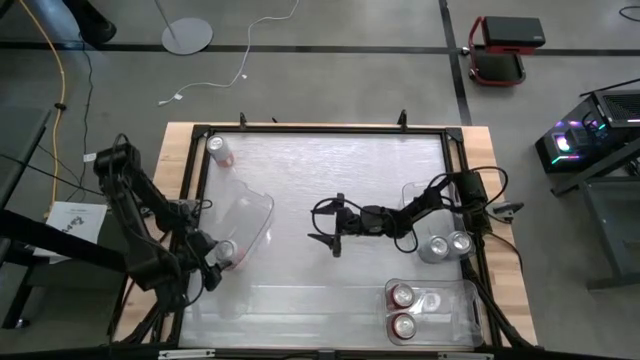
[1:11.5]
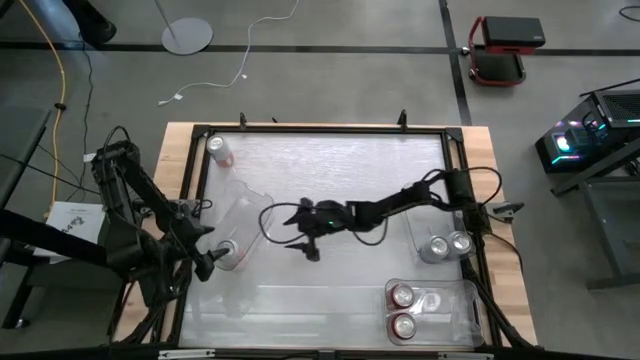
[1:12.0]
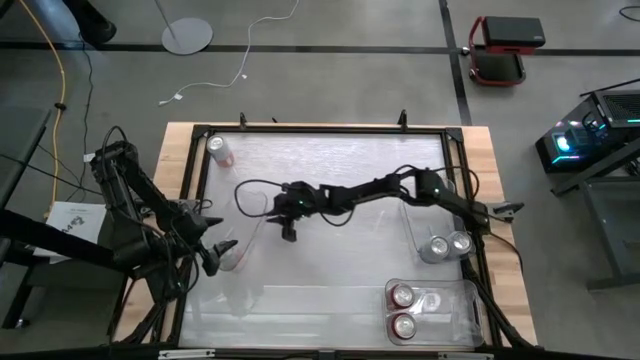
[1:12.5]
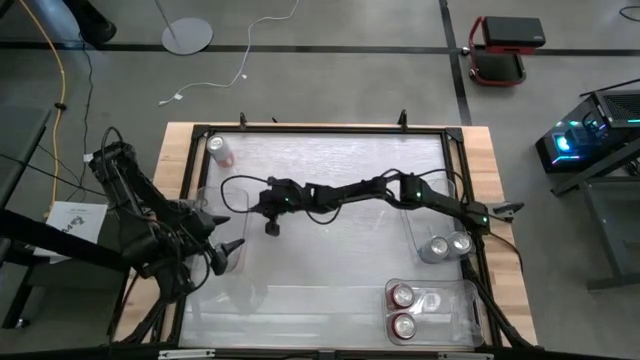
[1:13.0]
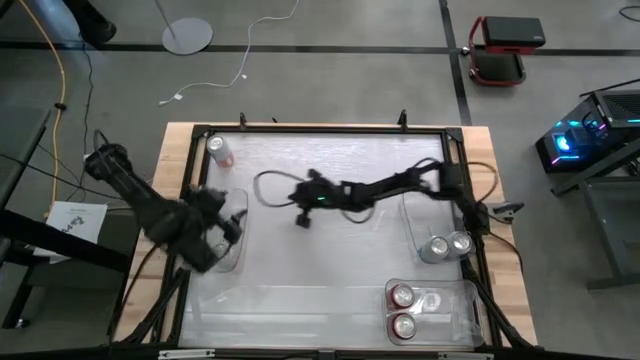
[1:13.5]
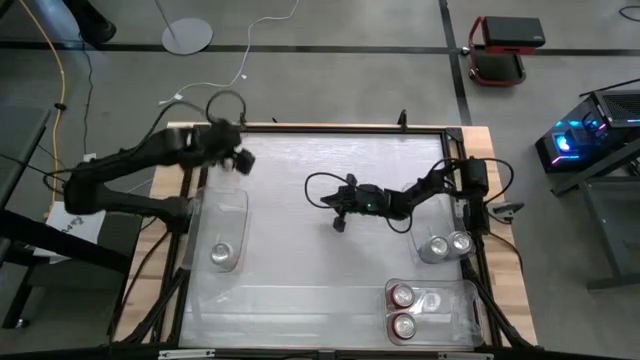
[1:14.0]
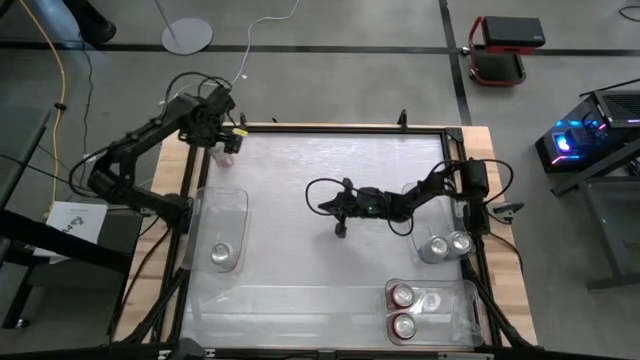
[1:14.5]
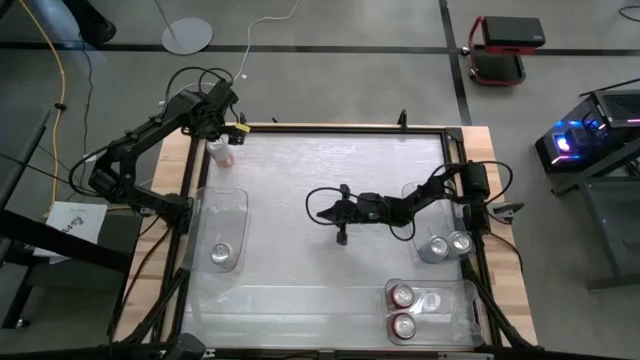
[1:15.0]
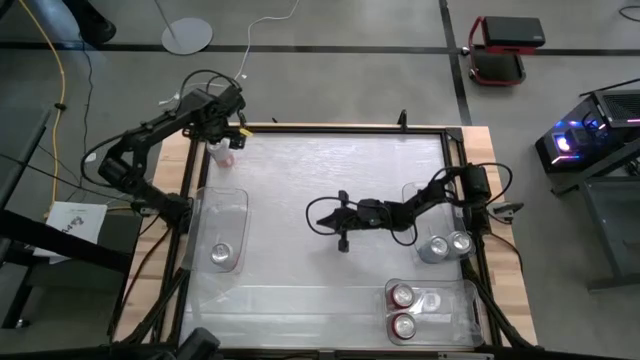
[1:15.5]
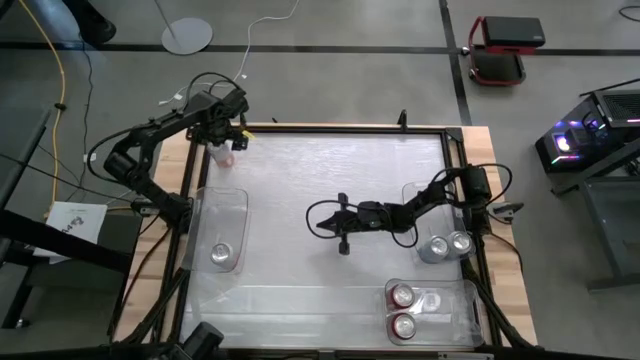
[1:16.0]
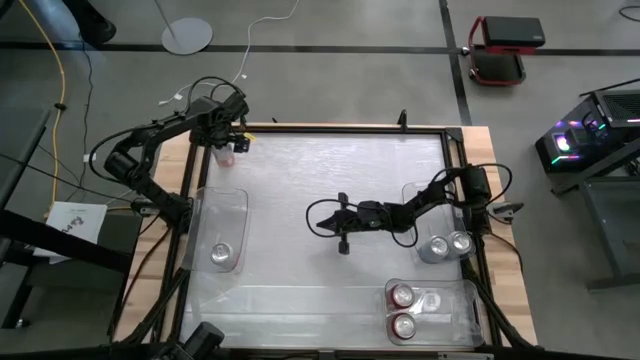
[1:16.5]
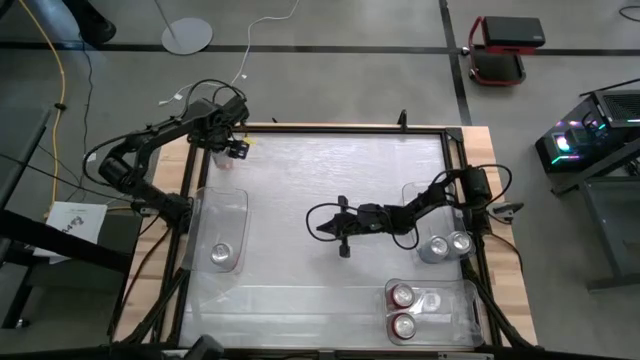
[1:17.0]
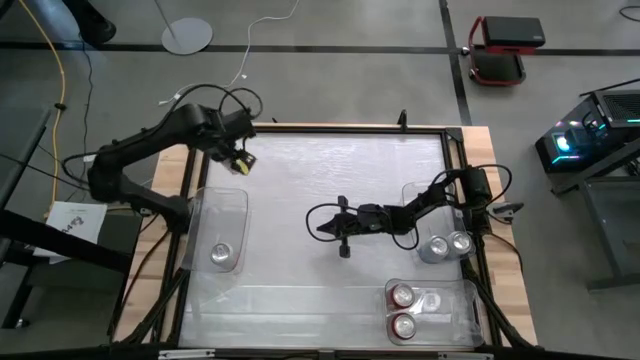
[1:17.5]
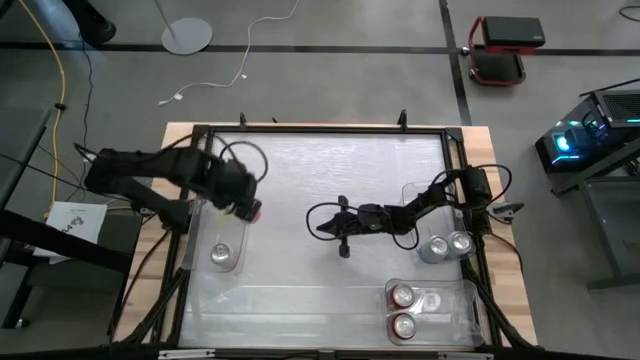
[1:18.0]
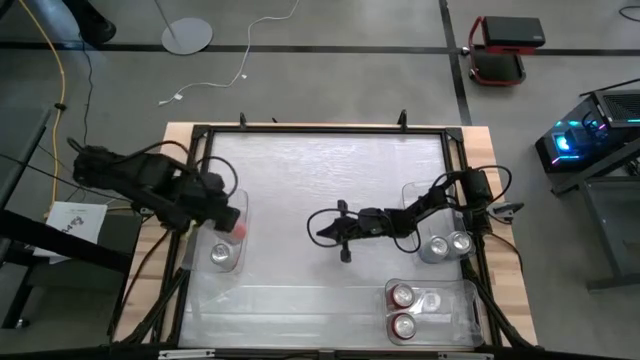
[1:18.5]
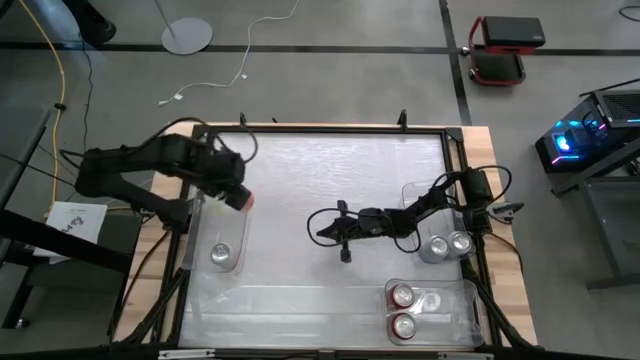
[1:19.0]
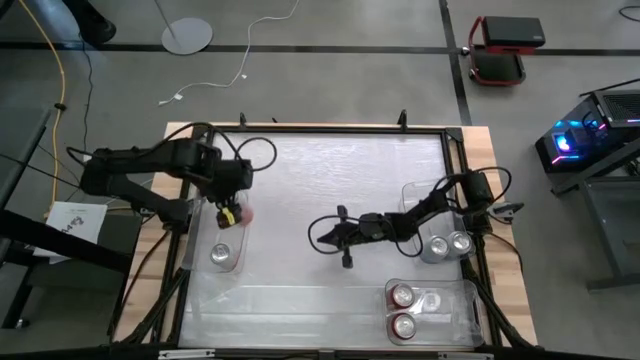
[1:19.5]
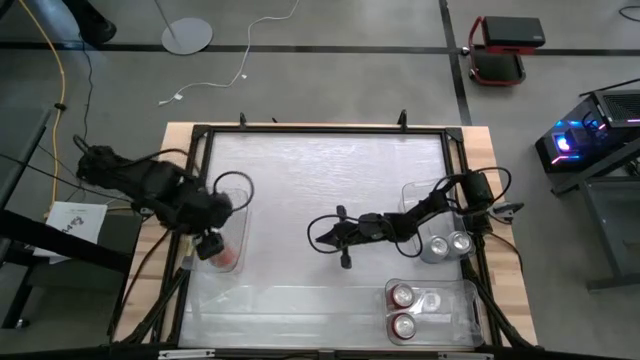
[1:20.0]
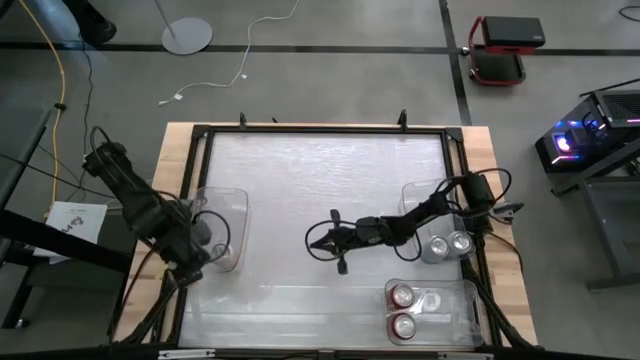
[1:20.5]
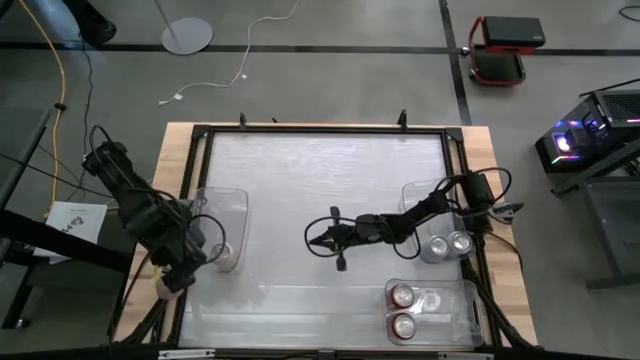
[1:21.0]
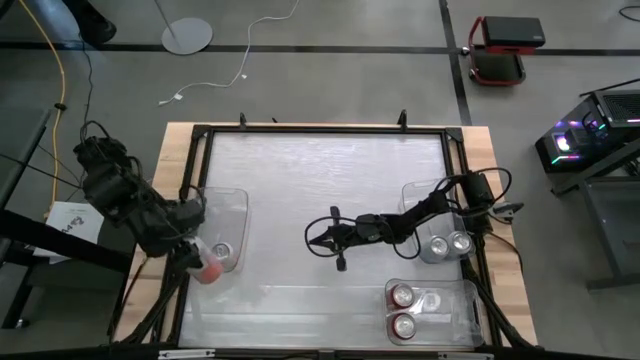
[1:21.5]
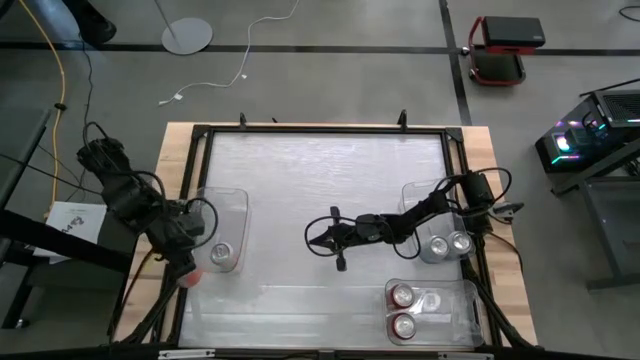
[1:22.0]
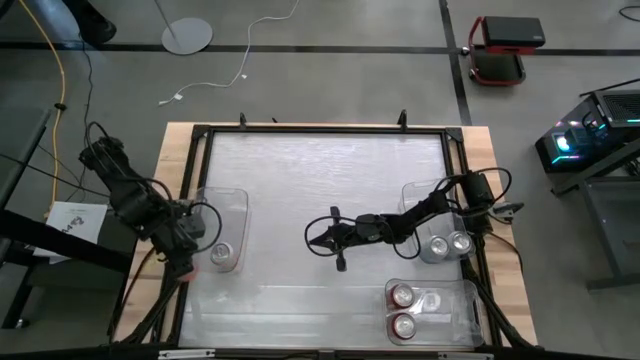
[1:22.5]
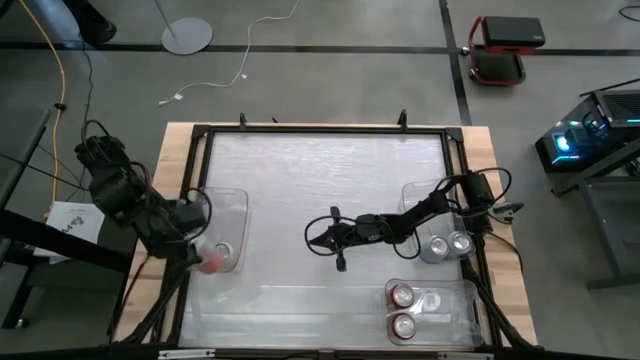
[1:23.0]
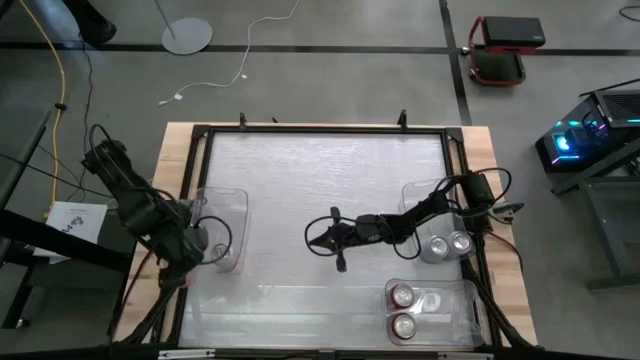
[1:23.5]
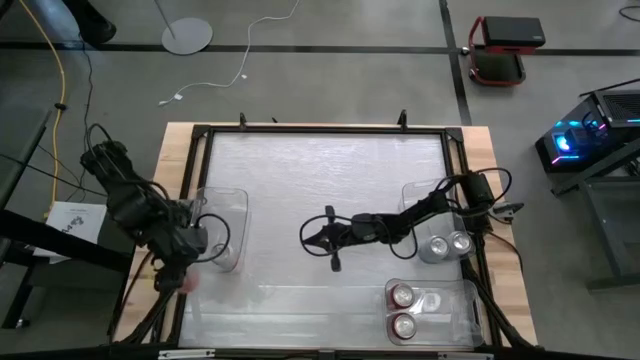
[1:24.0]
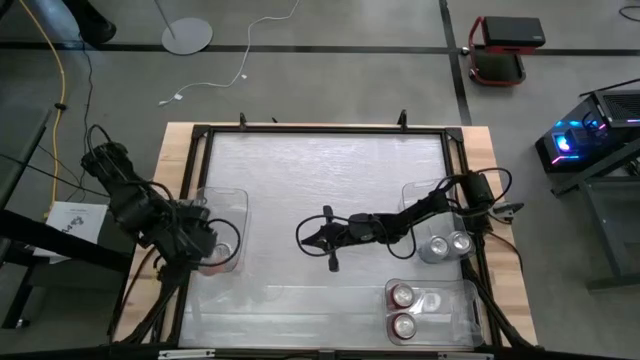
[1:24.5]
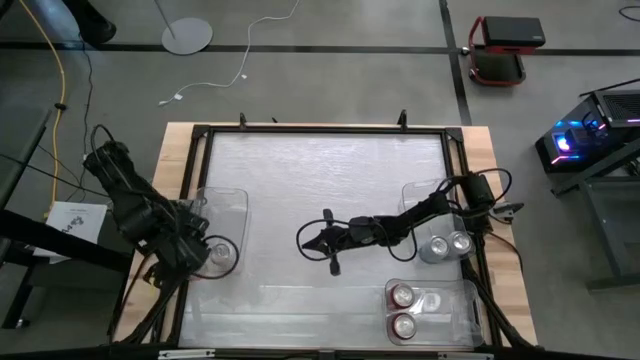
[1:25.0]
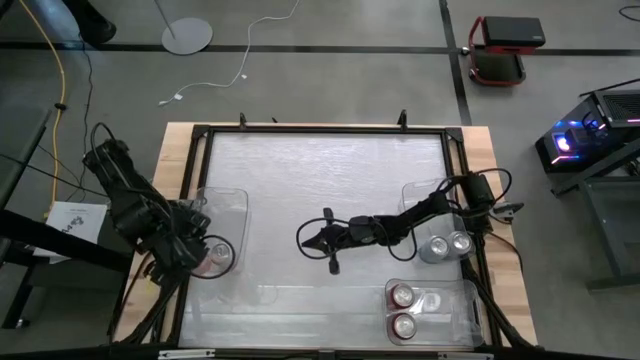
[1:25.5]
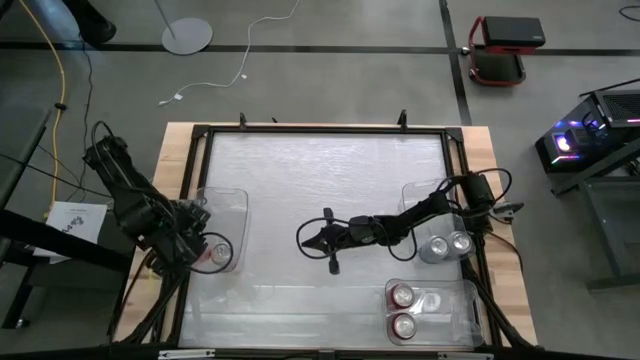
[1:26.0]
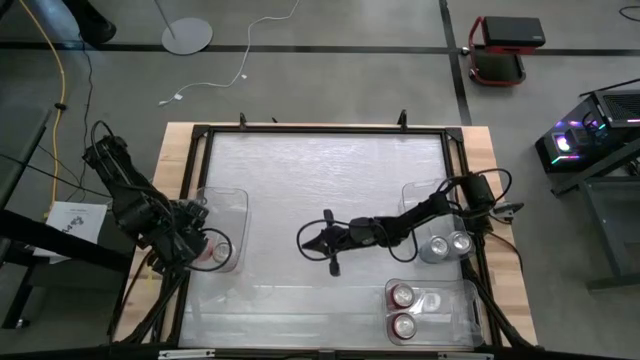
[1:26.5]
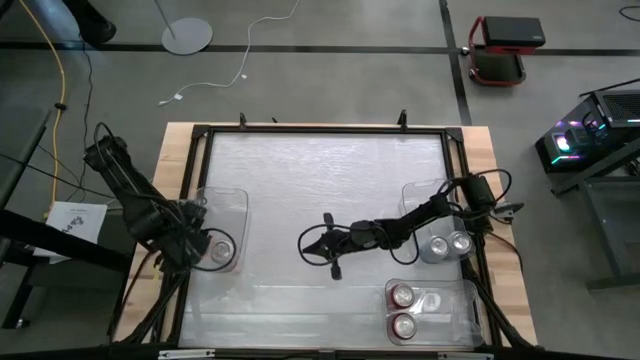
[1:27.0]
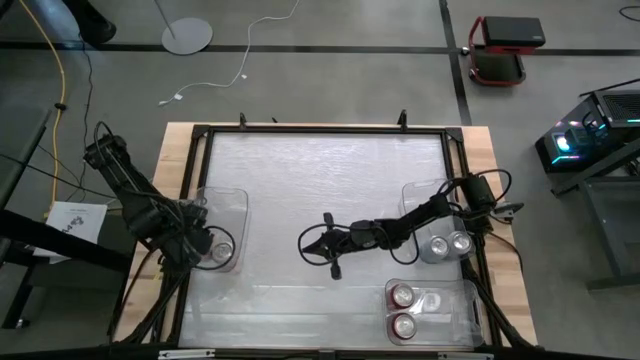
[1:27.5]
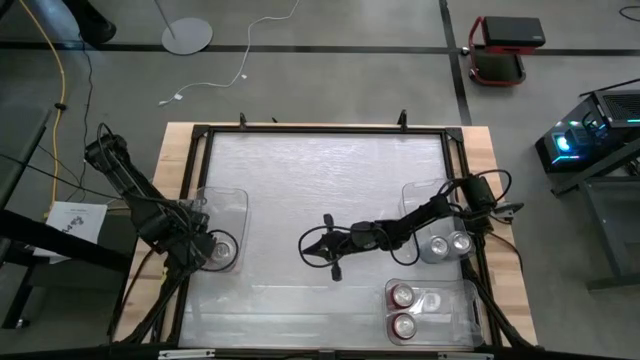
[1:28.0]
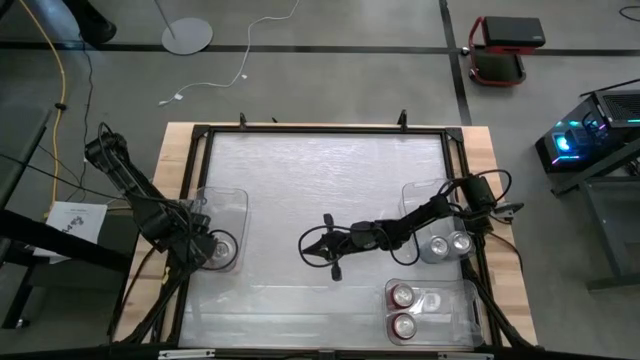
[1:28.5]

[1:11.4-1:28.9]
Task: Sort soda cans
Put the orange-white soda can into the left transparent bin

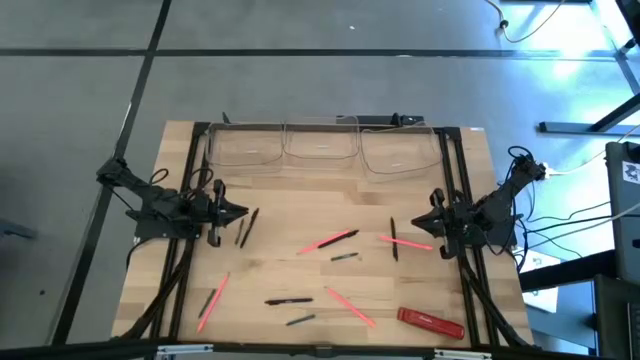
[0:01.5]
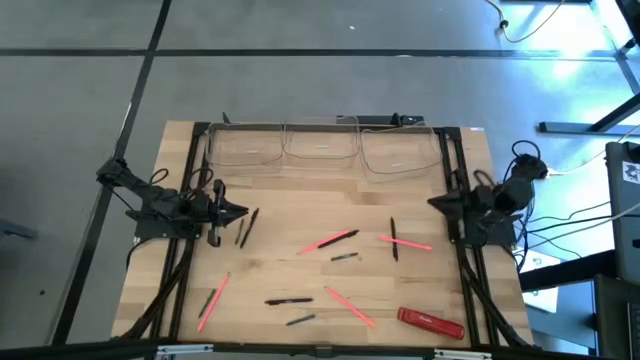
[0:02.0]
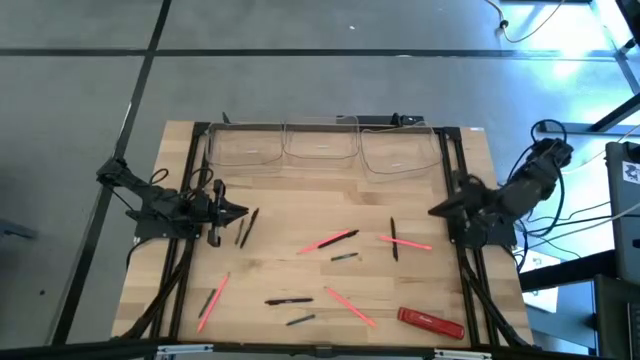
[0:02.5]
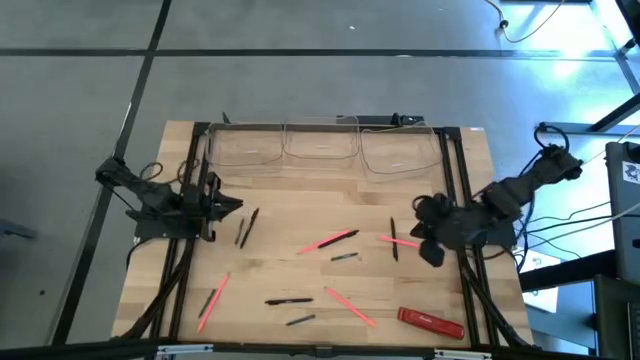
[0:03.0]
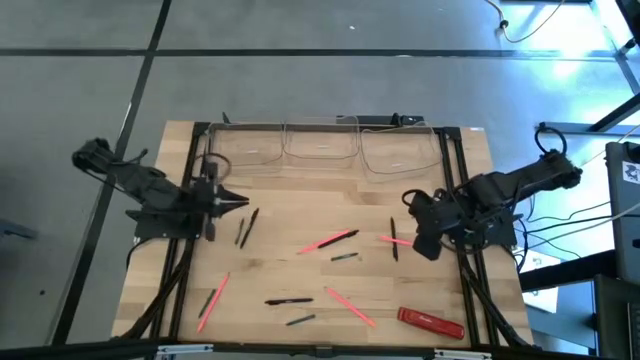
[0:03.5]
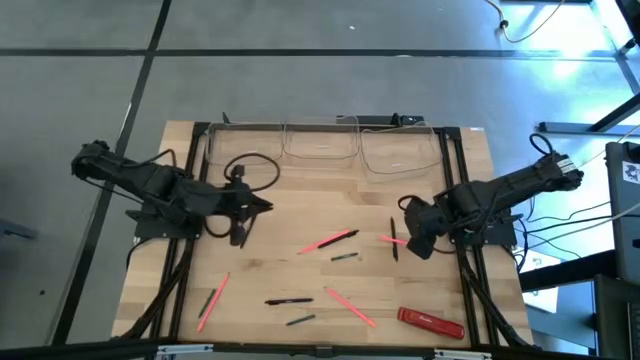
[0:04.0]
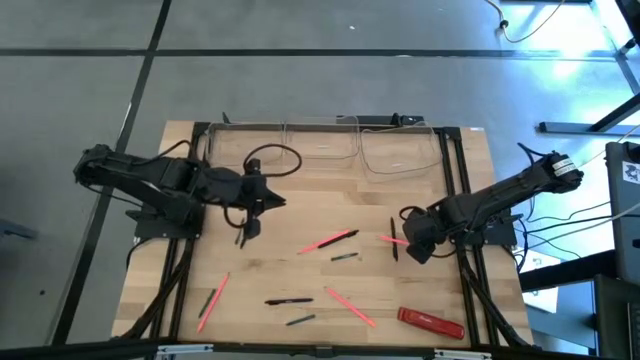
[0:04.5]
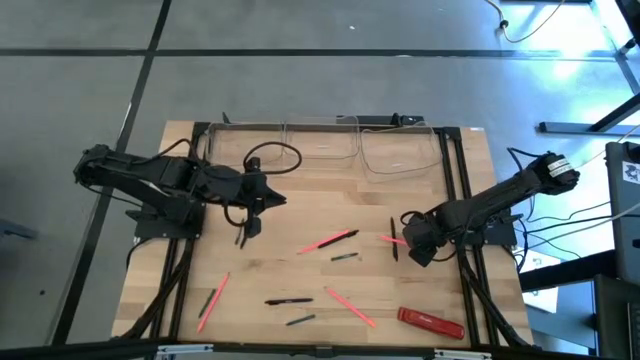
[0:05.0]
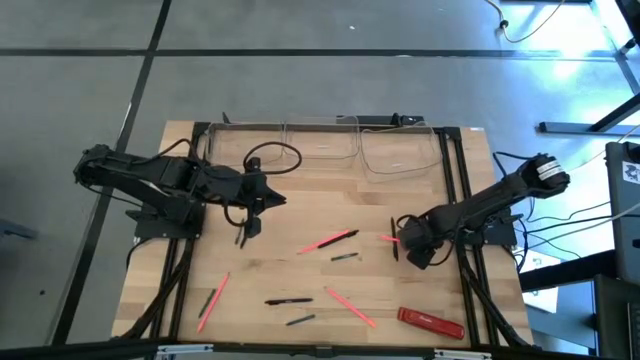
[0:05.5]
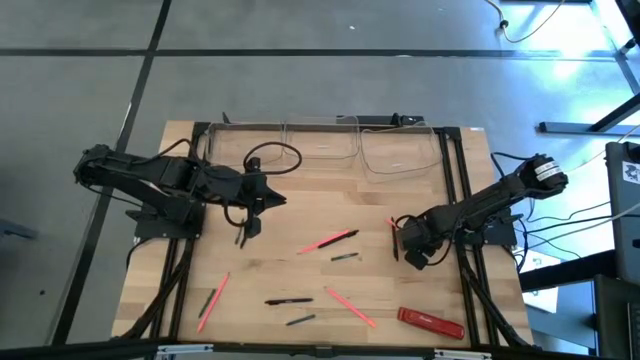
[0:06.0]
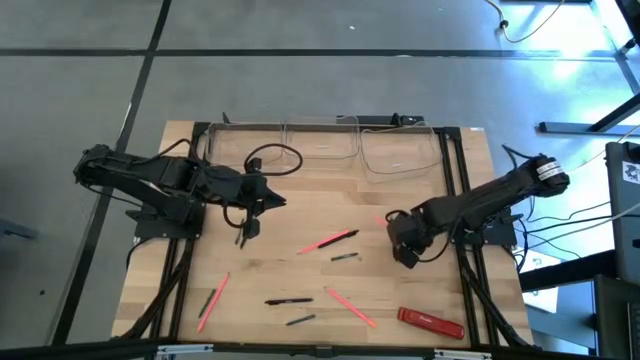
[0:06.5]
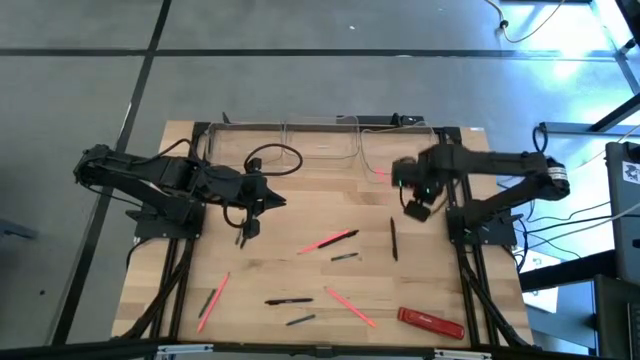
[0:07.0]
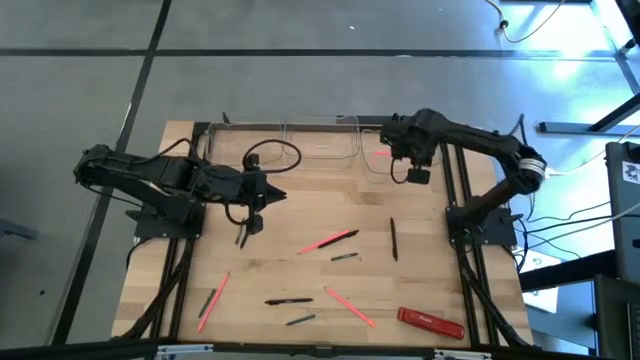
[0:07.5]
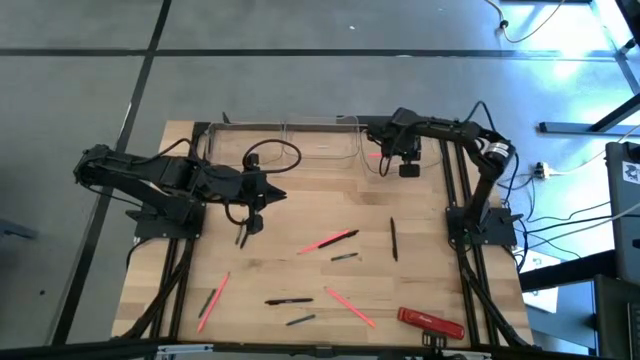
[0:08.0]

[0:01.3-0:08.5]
Task: Sort crayons/erasers/pens/pencils in bins
Put the pink pencil into the right transparent bin
